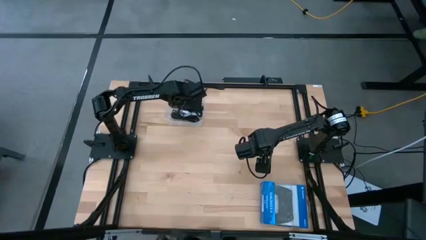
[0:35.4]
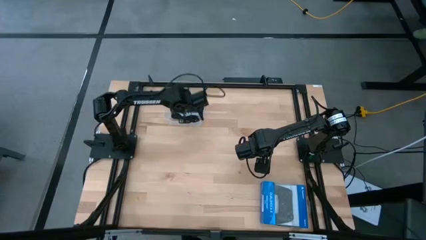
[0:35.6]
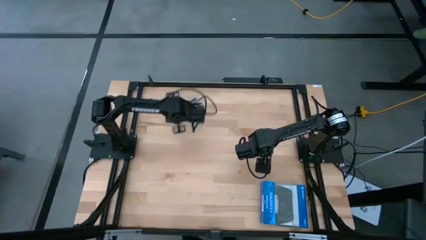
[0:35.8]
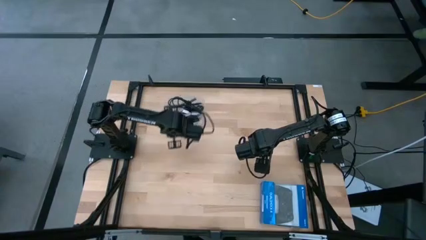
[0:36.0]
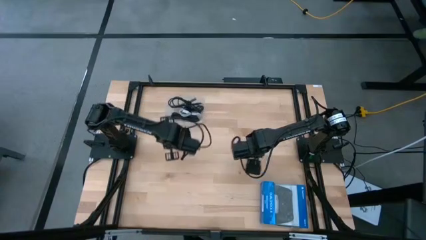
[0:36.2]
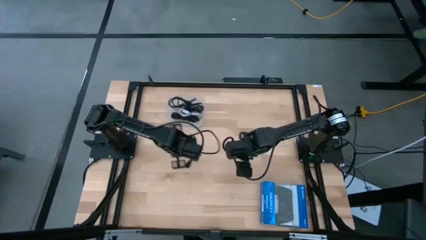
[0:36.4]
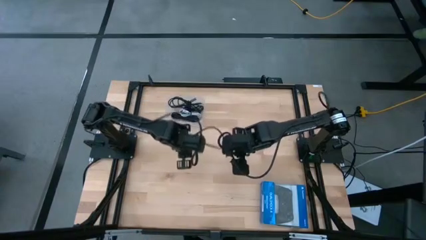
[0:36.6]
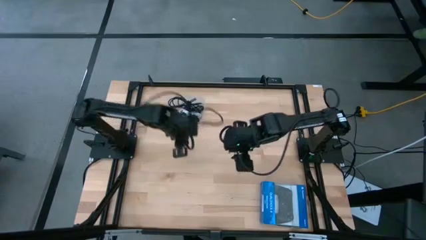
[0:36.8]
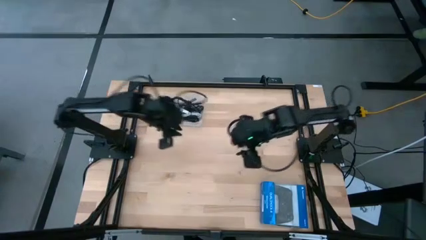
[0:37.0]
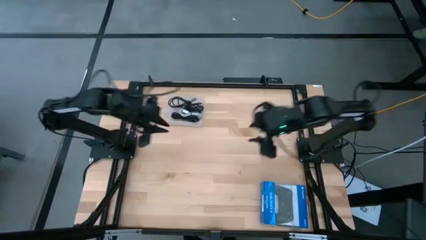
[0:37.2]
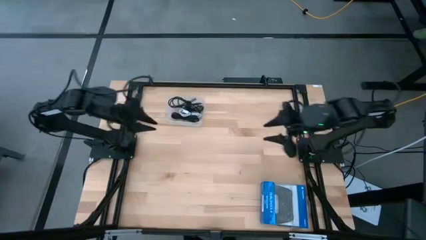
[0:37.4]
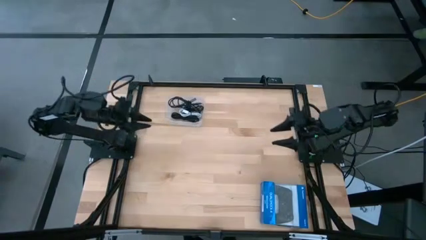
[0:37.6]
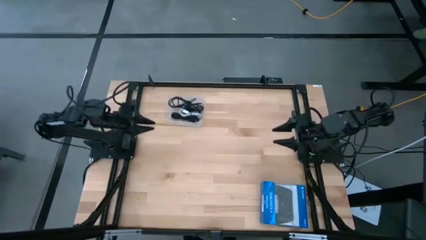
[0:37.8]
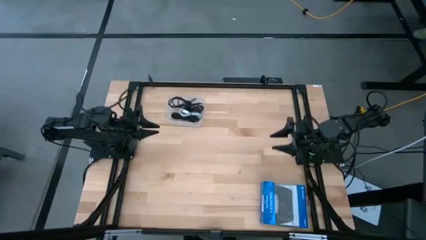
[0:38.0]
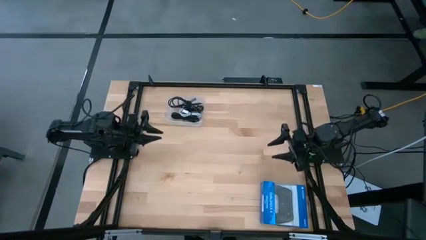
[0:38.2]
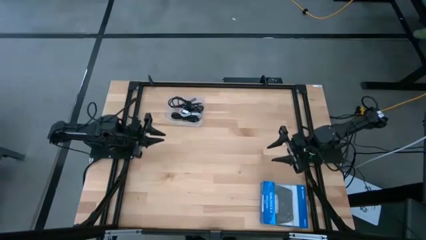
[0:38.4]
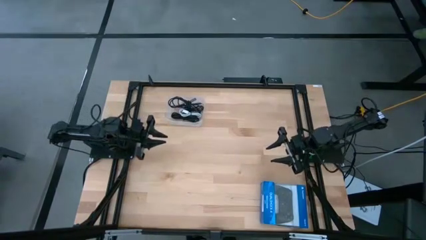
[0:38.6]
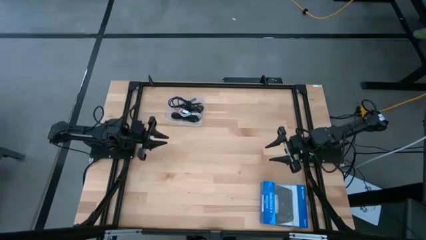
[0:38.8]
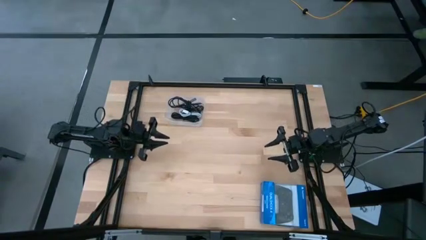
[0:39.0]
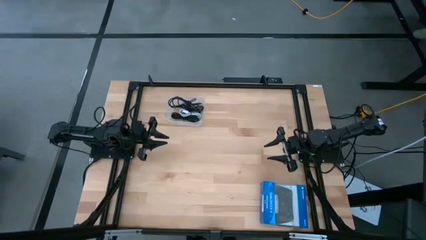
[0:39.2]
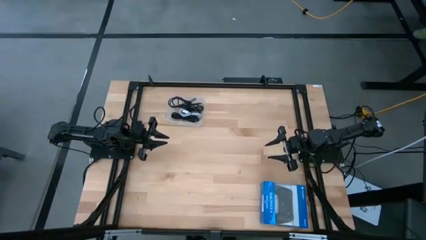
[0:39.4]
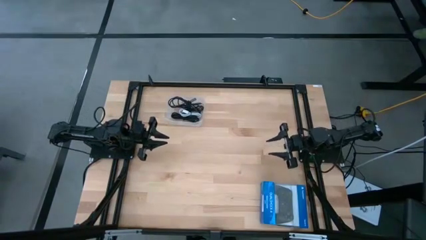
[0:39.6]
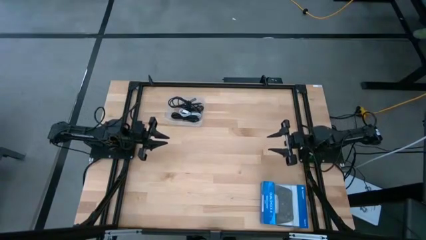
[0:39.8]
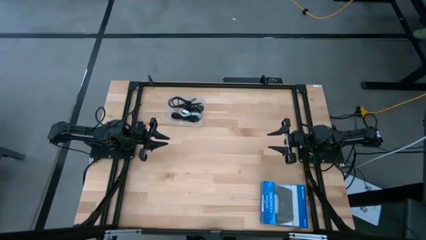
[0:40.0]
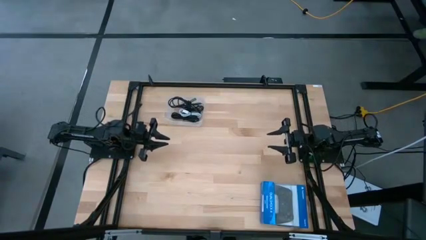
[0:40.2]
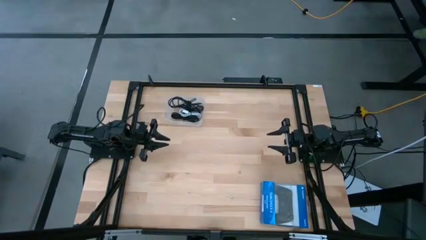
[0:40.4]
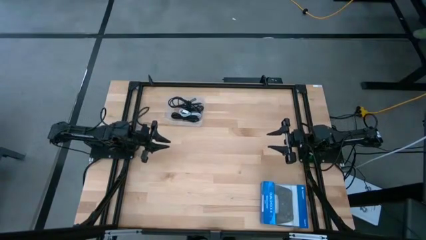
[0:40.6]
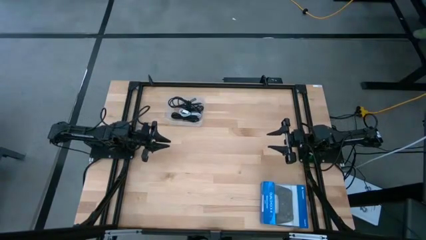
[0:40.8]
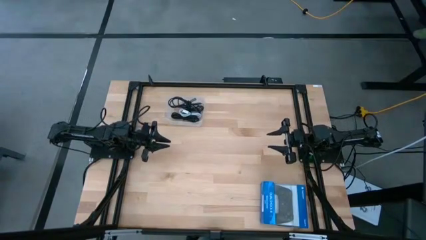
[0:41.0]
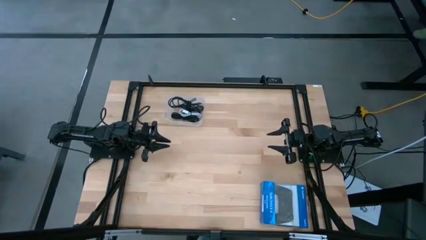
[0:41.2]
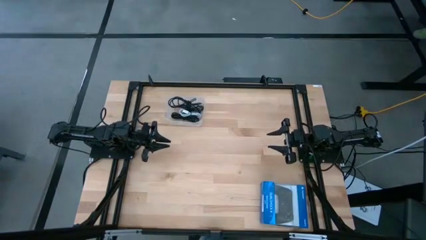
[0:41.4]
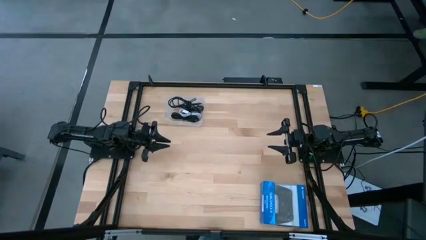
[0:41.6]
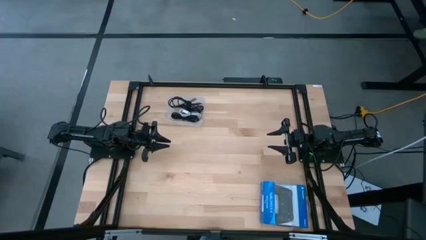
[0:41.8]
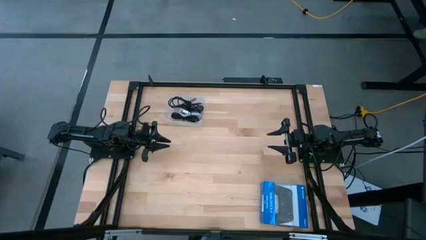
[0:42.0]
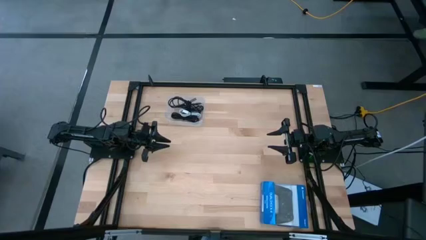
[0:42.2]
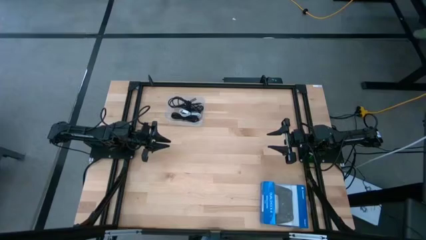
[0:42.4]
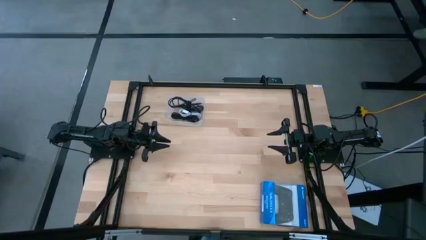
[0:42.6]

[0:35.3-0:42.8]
Task: Pick and place USB-C Cables
Return to home position

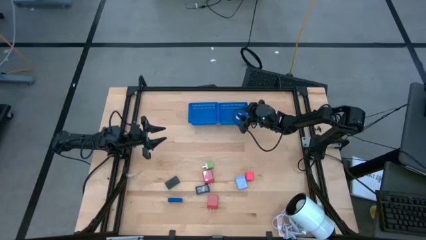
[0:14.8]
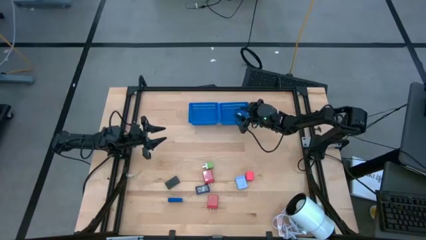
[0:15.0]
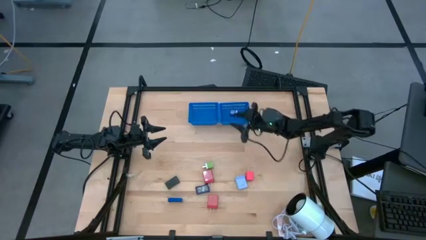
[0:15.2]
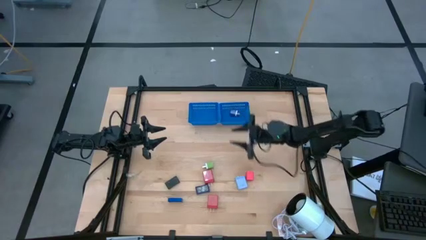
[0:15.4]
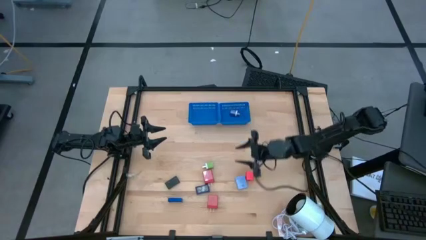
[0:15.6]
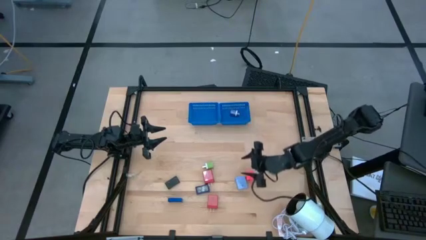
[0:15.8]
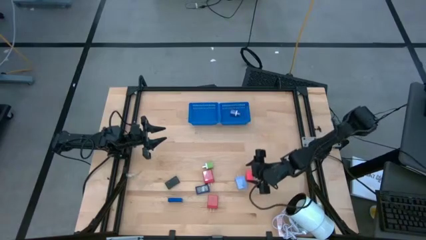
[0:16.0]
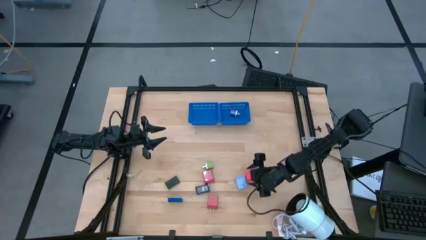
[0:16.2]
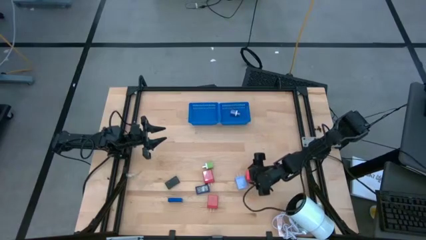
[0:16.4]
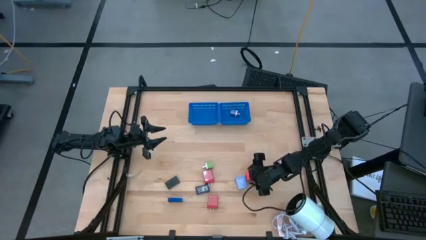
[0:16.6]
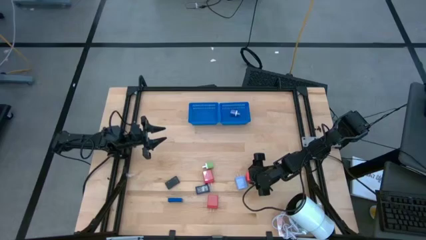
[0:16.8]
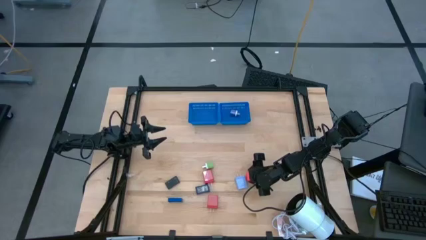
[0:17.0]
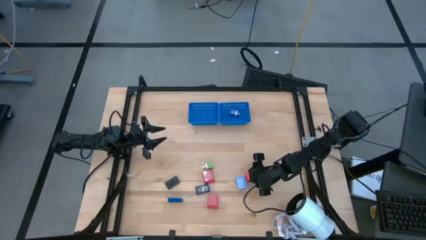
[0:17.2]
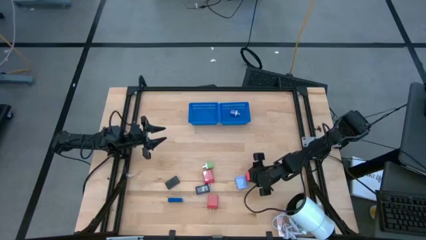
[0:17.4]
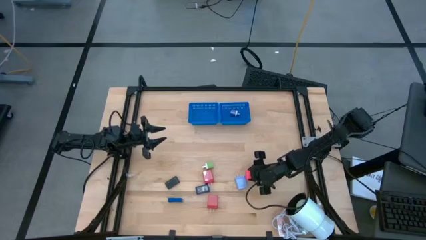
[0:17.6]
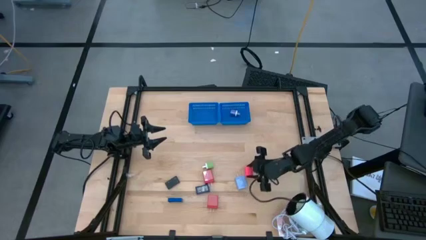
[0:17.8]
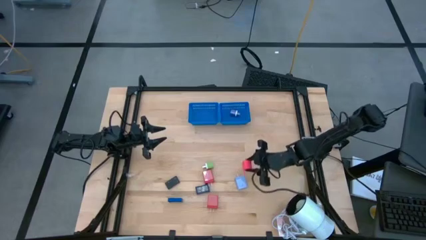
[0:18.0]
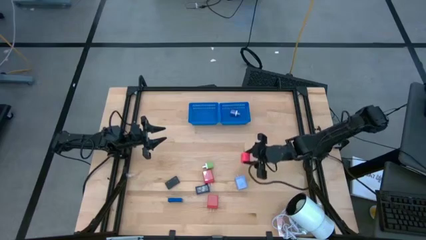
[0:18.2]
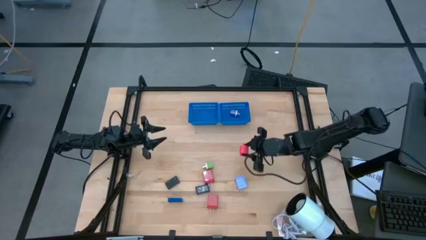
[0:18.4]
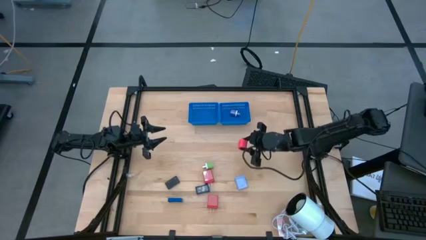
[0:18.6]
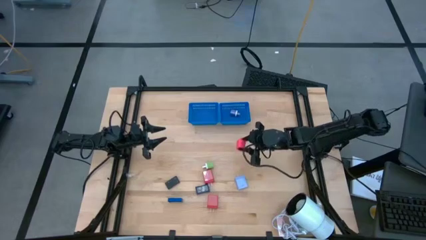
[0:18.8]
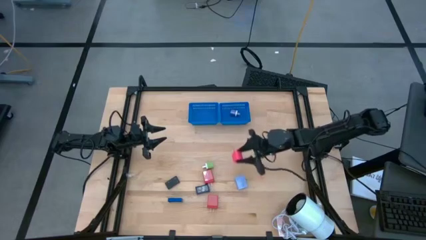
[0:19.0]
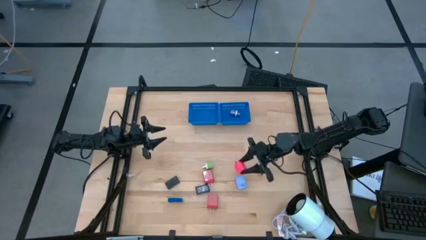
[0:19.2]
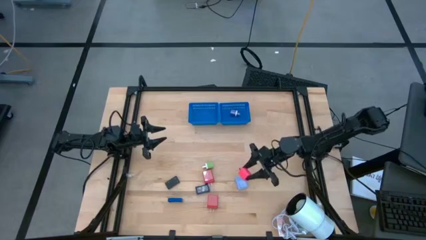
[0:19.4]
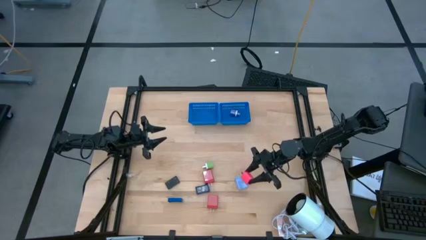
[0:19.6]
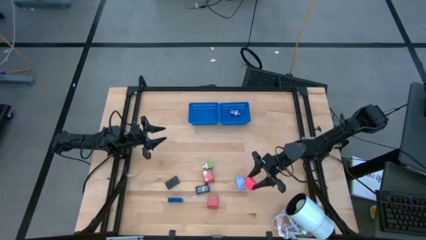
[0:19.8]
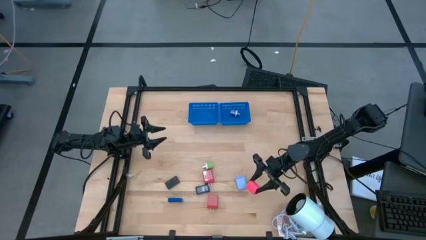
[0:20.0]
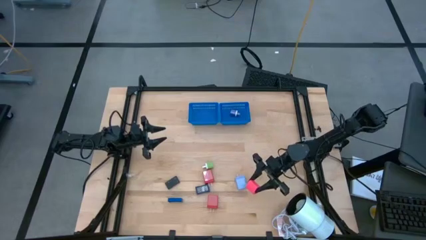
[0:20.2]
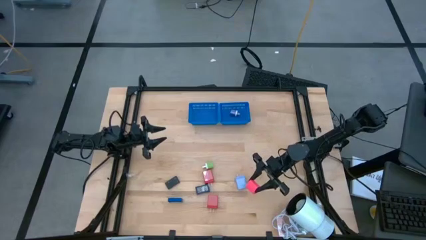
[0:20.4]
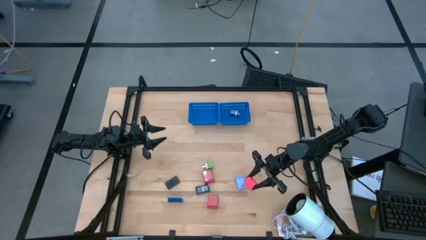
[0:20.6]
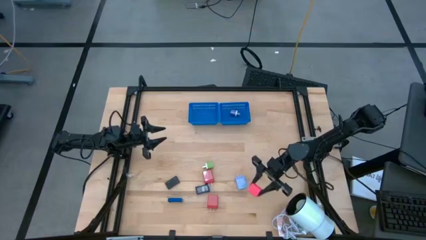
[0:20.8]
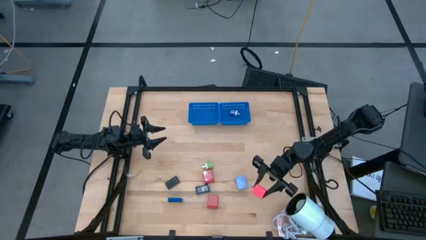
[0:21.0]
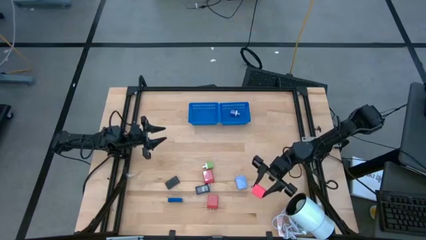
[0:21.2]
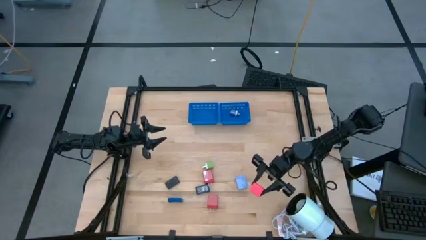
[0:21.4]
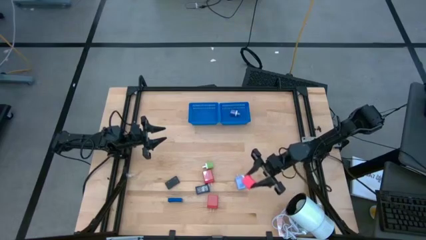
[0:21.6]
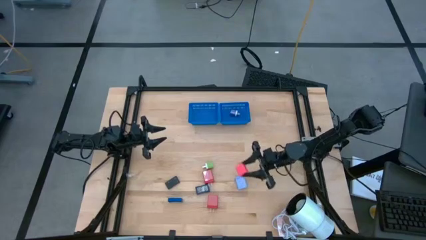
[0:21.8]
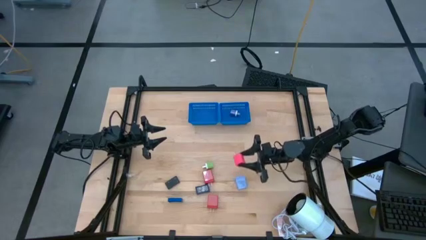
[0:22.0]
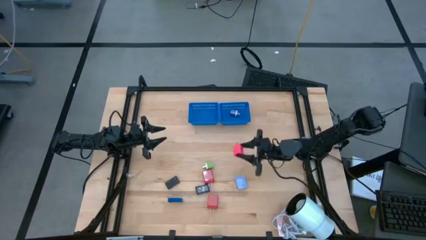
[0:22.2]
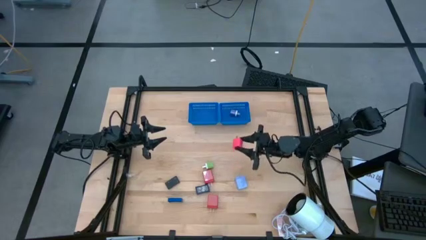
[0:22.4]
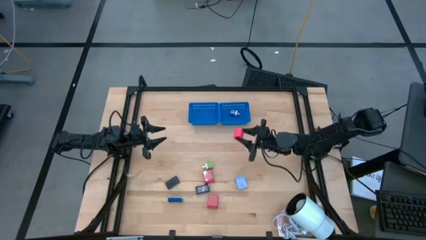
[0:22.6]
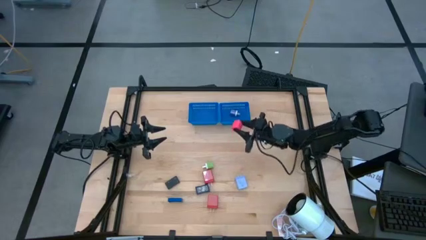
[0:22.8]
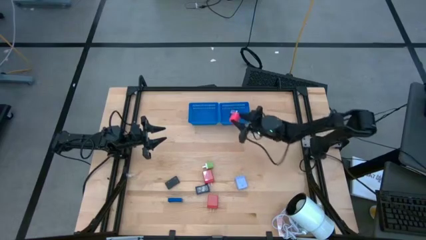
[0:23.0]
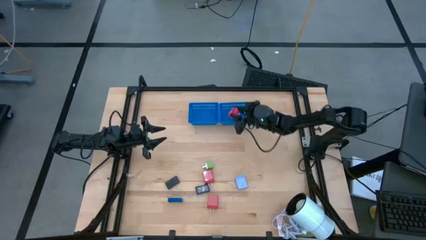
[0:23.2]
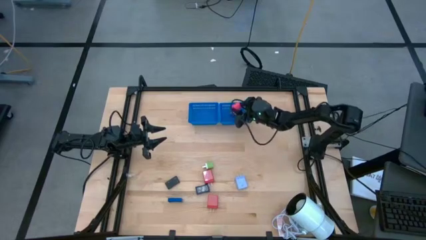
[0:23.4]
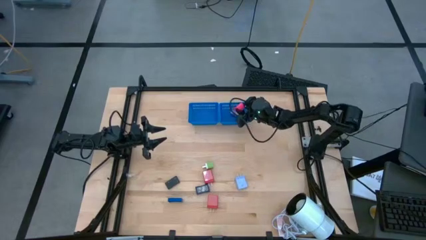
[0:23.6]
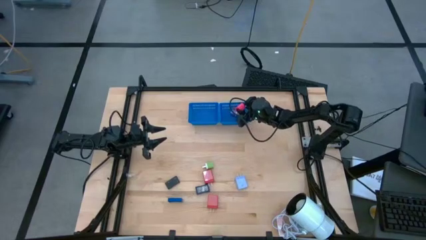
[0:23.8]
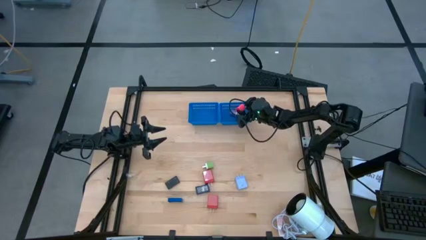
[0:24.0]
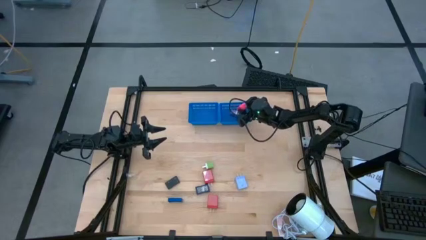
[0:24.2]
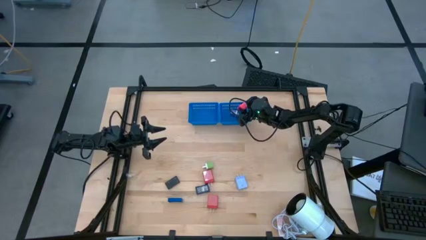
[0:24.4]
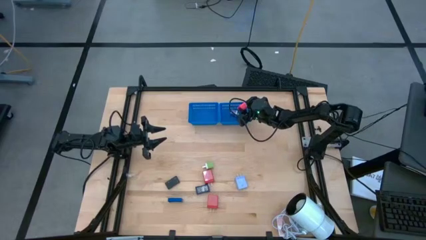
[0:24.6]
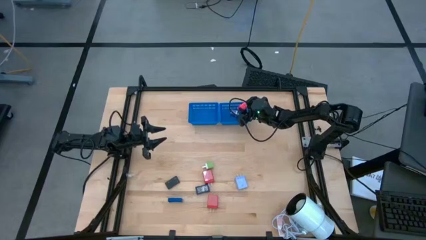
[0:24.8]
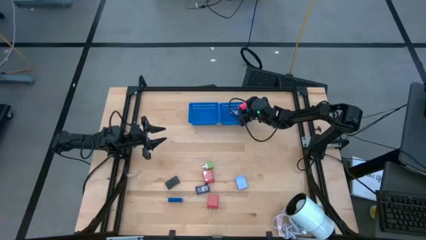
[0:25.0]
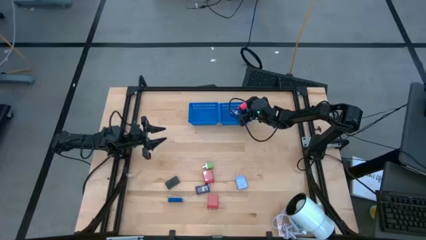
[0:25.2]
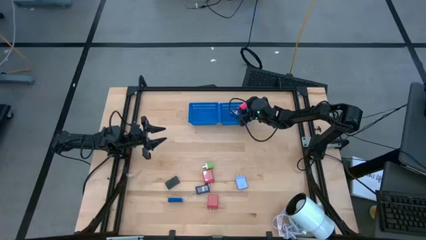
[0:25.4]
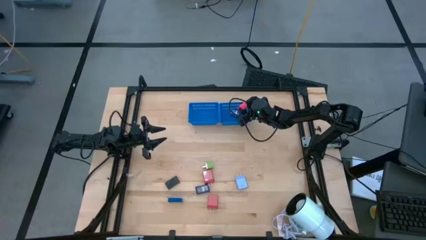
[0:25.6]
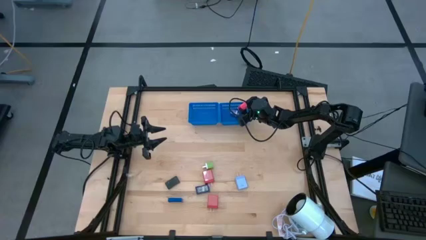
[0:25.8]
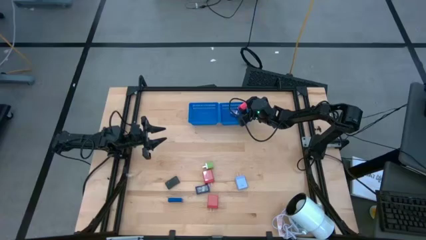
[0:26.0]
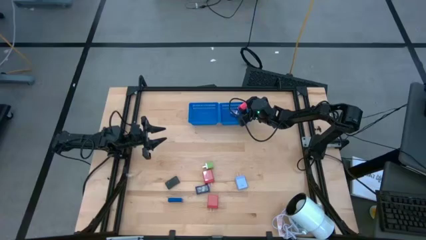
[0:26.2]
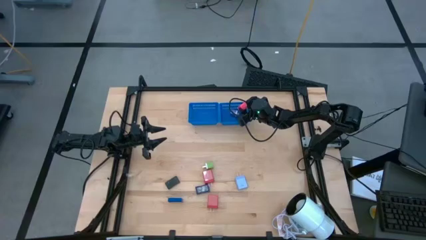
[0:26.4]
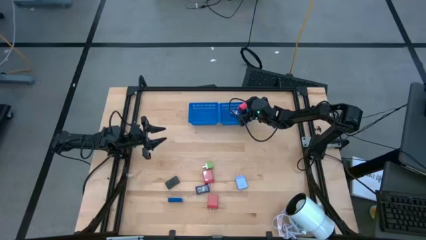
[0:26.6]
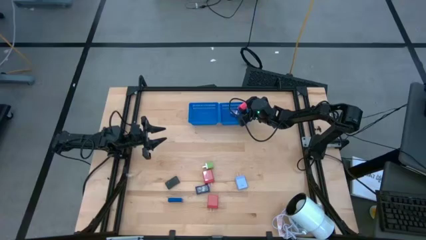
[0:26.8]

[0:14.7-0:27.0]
Task: Pick & Place Office items
Put the pink charger adapter into the right blue bin
